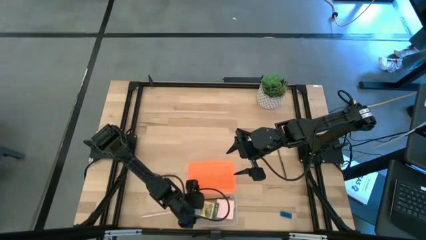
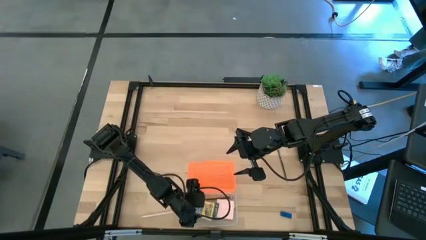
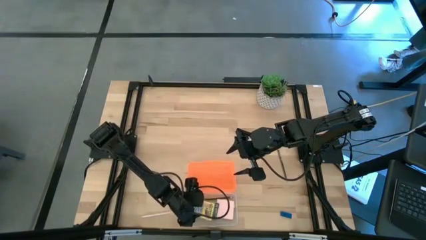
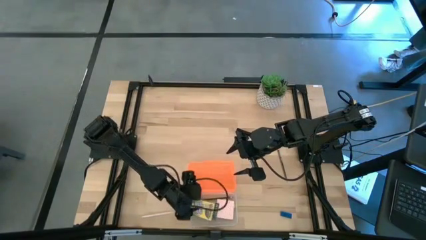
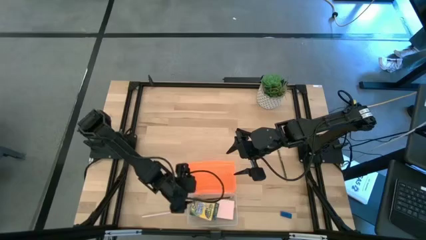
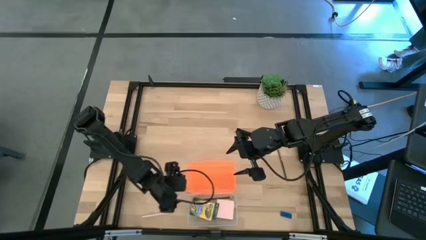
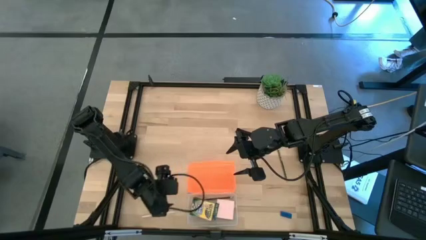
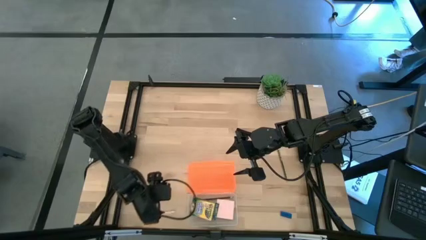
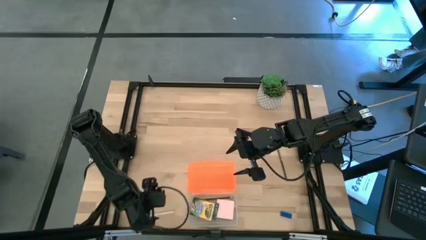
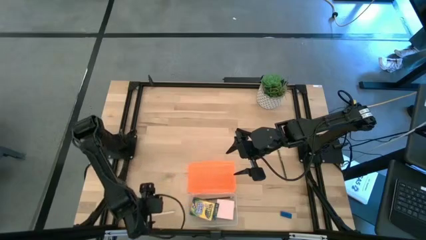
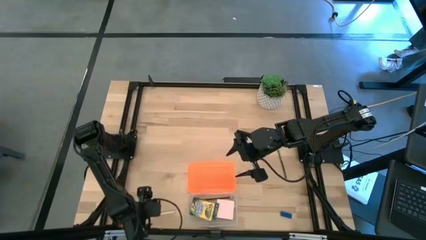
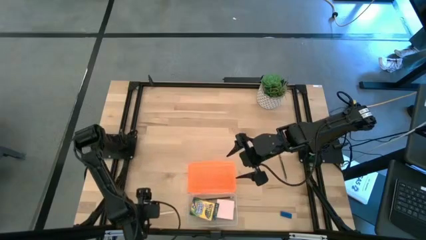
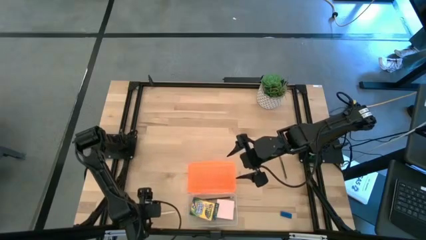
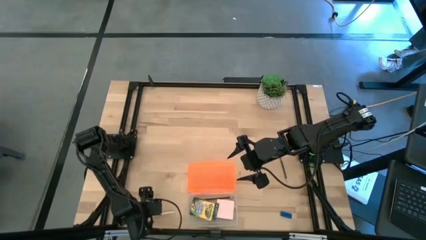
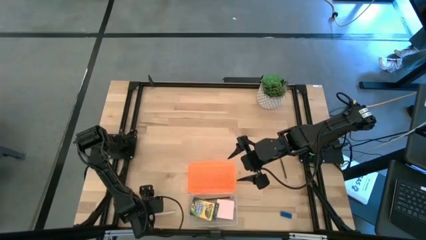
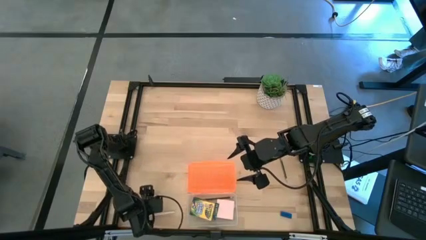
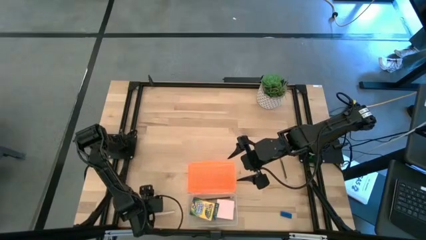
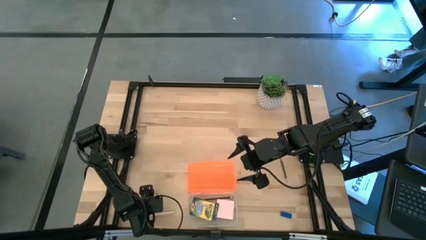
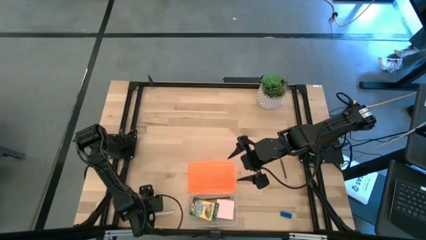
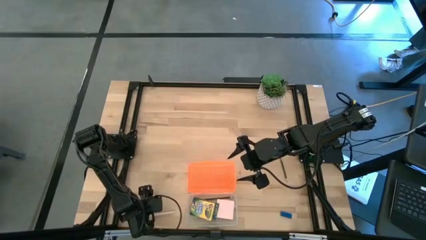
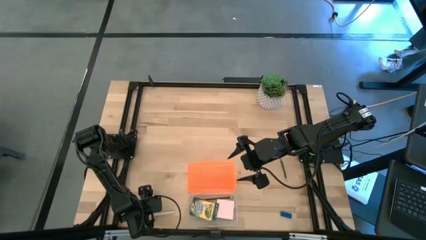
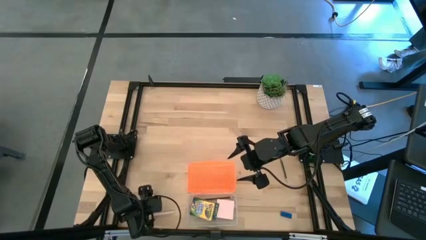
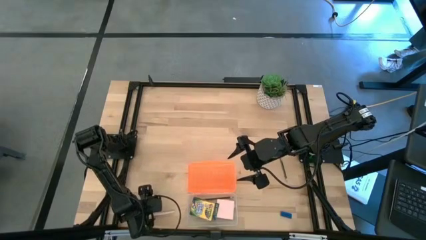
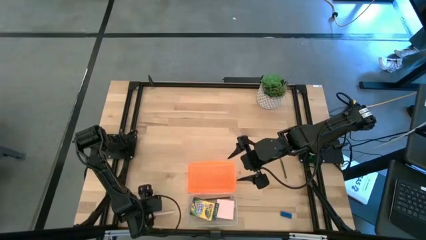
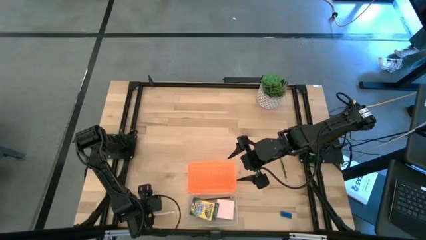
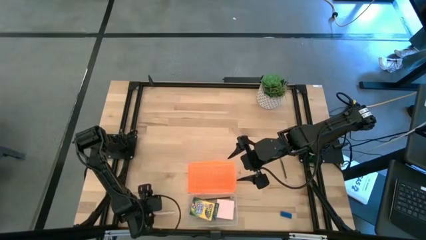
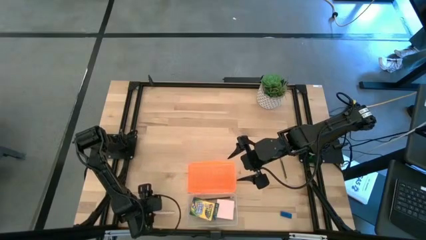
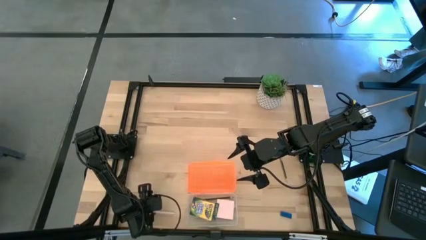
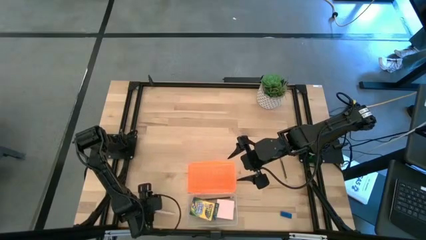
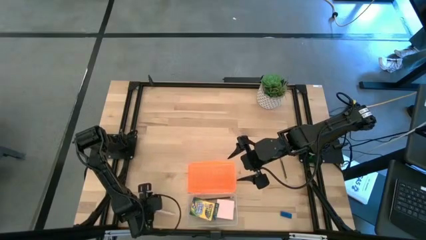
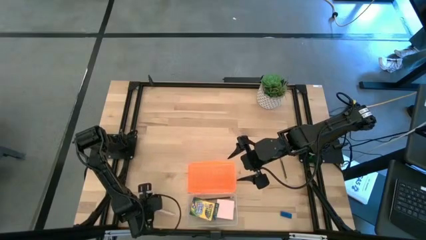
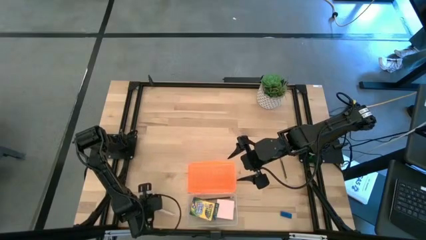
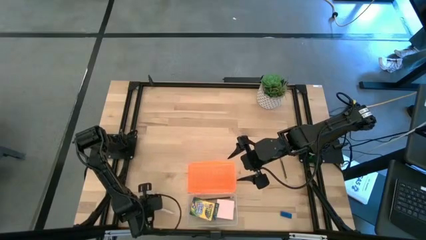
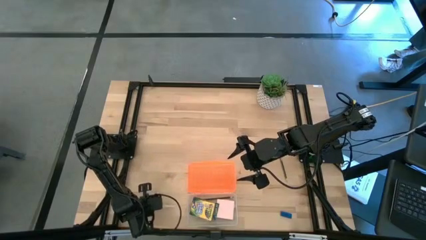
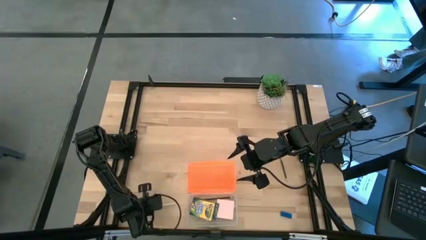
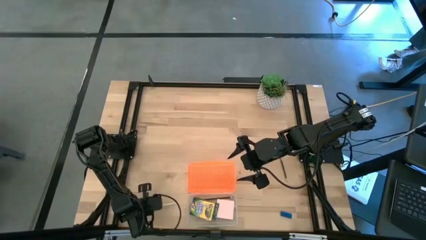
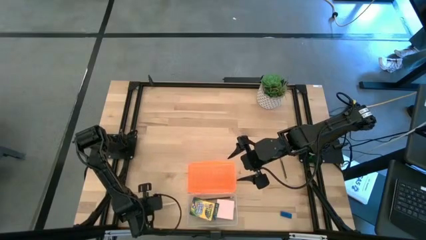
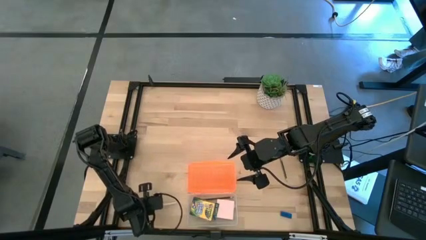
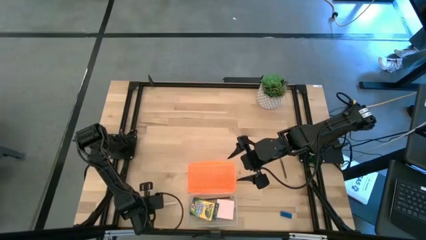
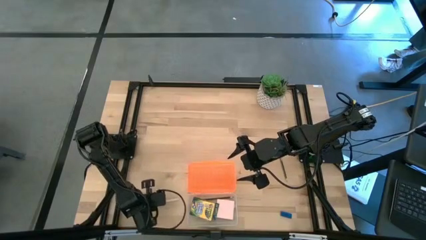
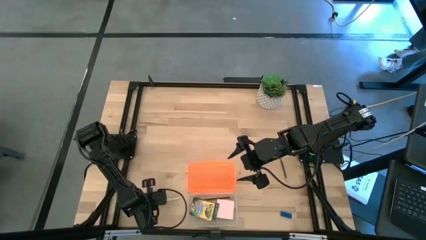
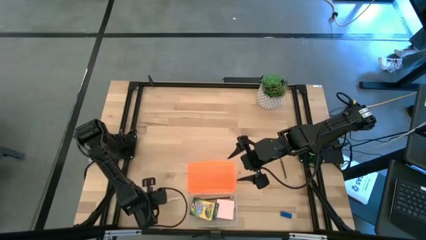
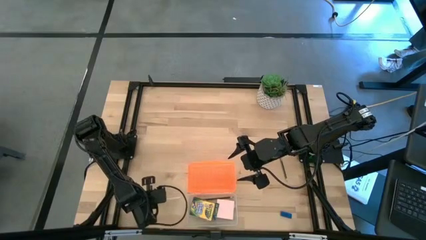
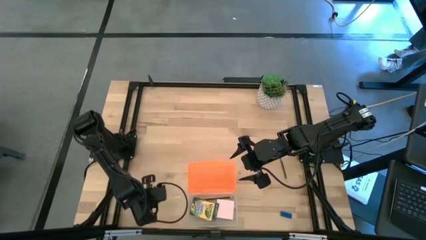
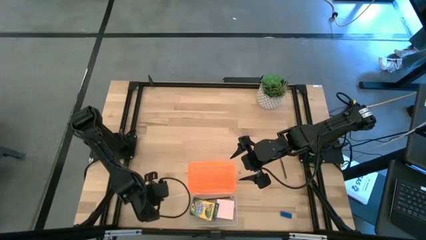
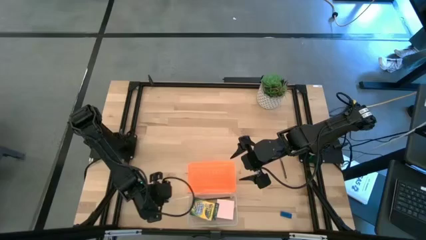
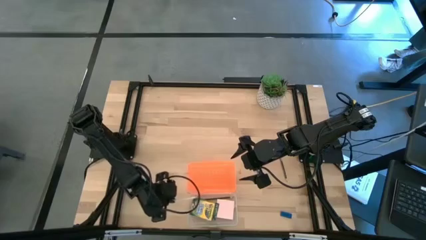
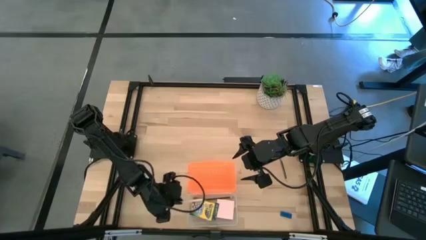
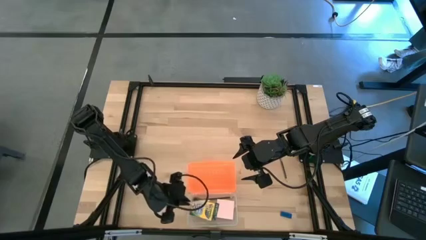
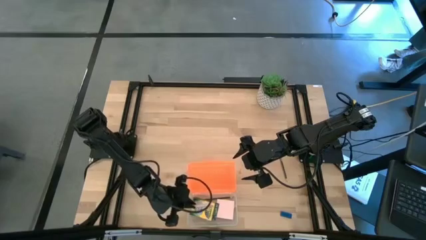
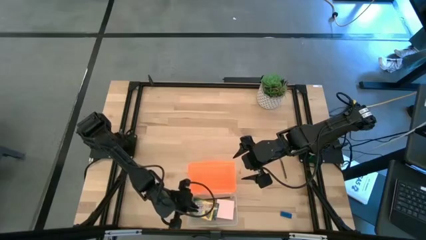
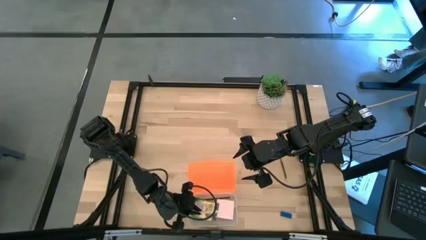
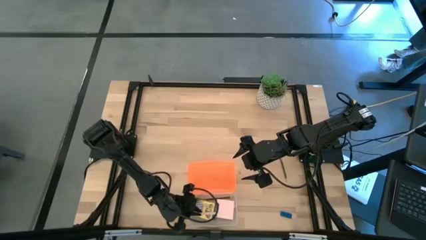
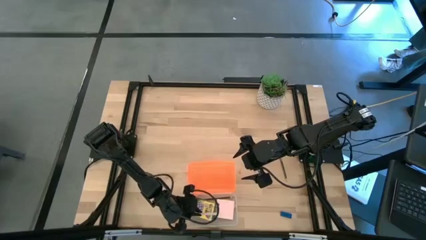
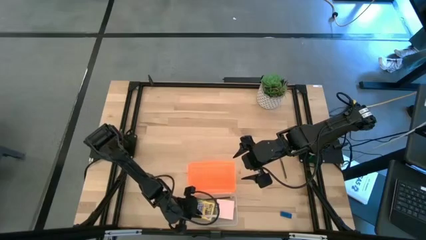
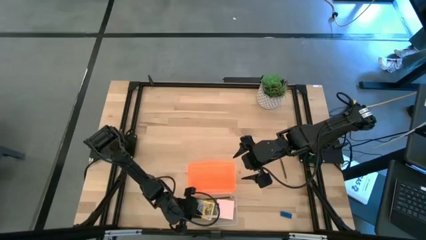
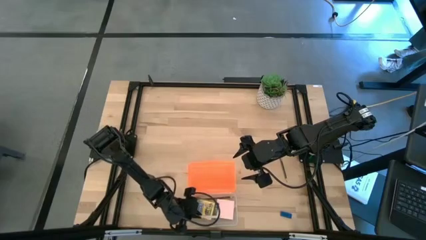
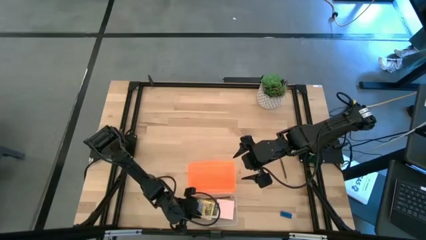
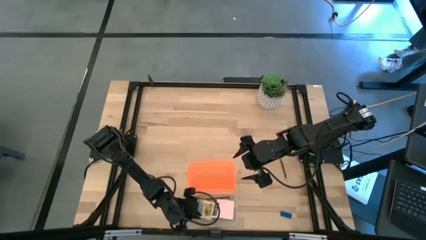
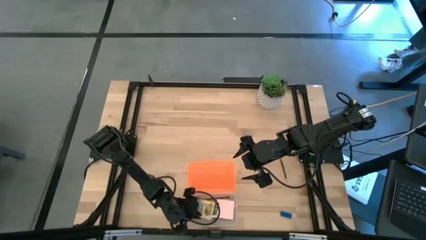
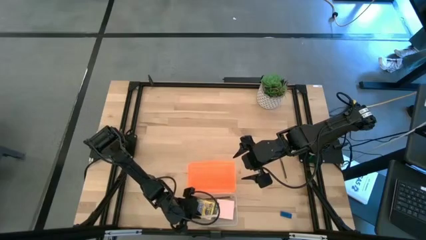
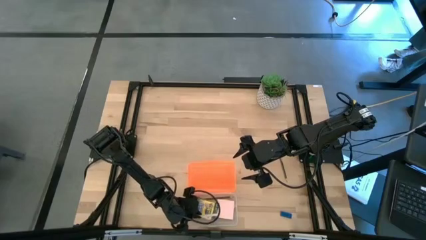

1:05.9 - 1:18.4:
Task: Pack school essentials
Put the white pen into the supply box

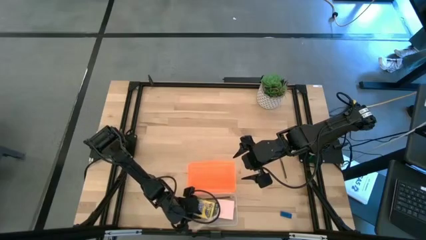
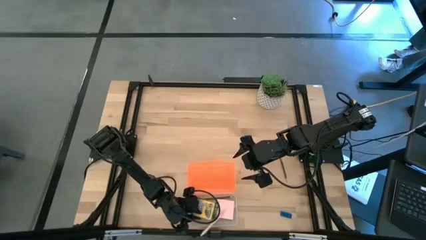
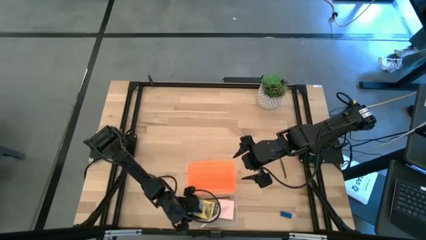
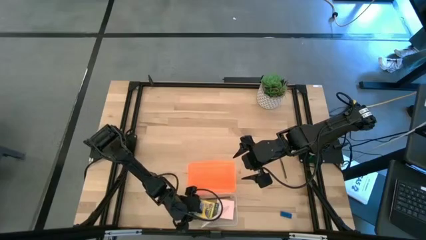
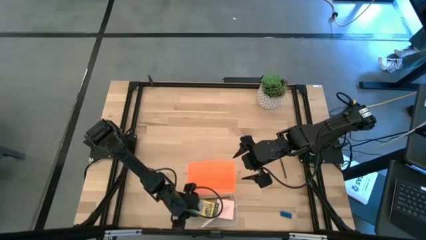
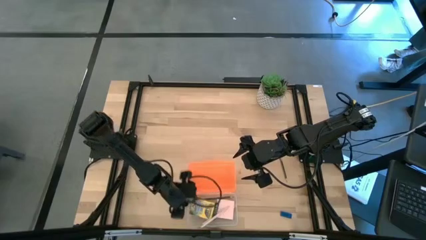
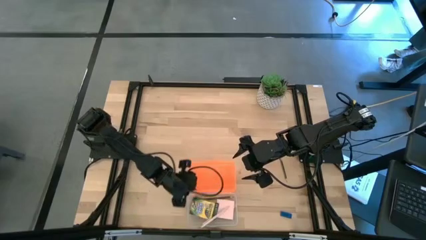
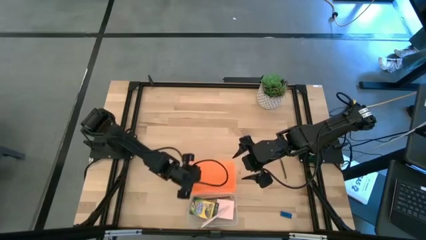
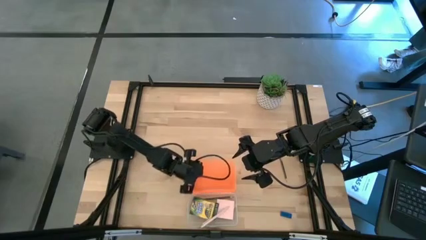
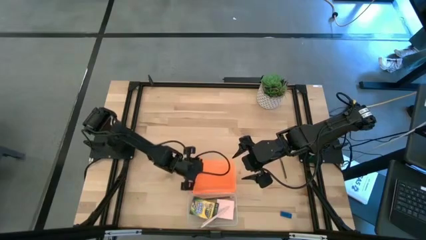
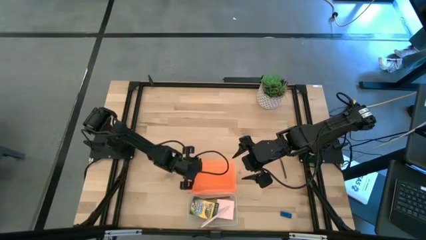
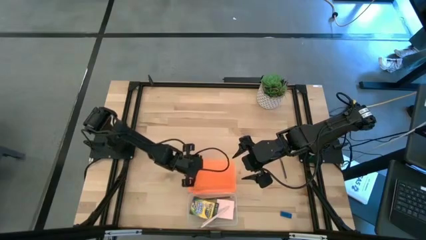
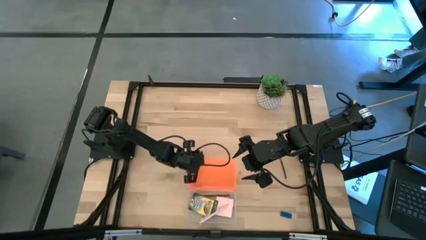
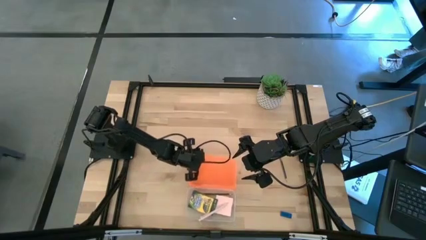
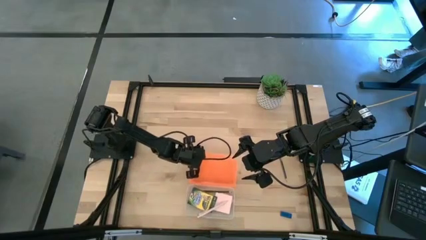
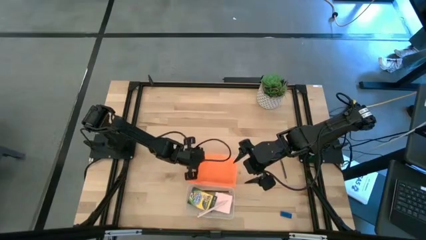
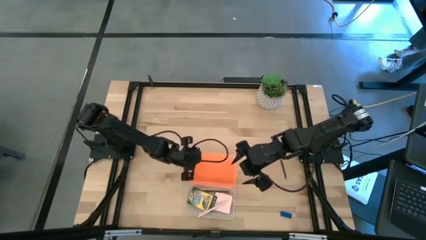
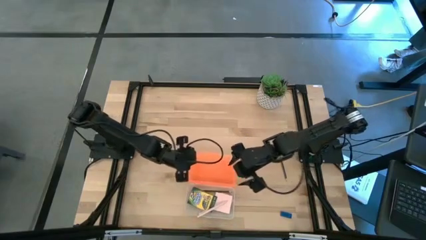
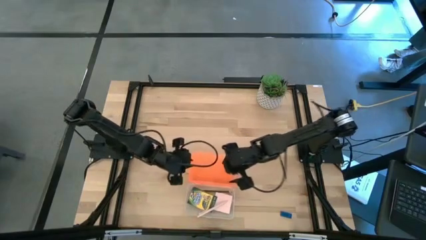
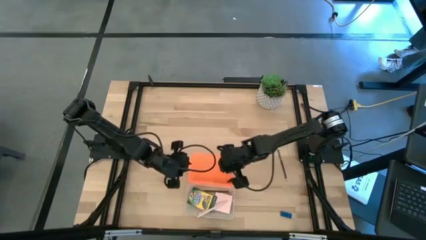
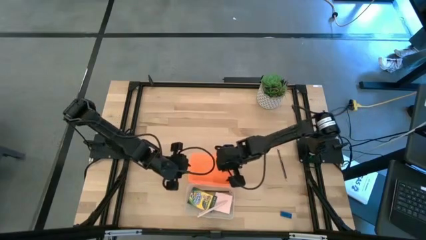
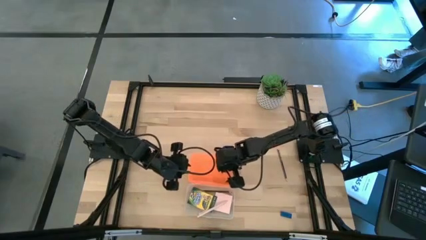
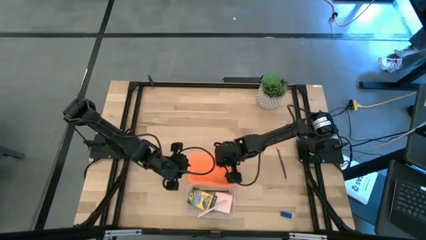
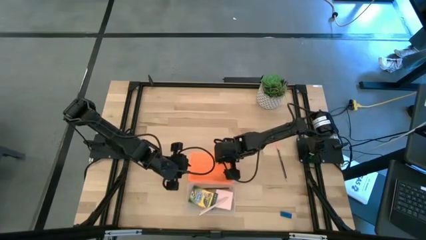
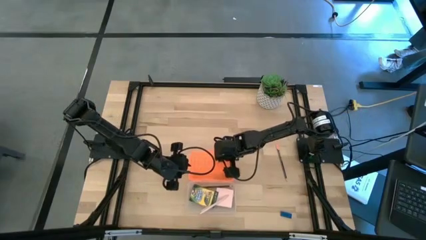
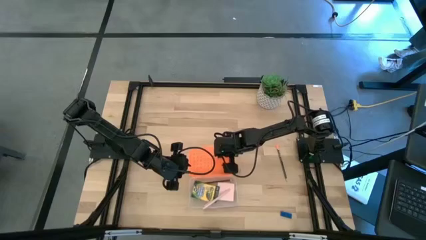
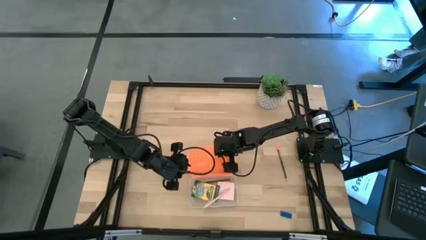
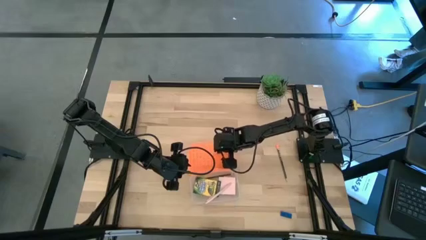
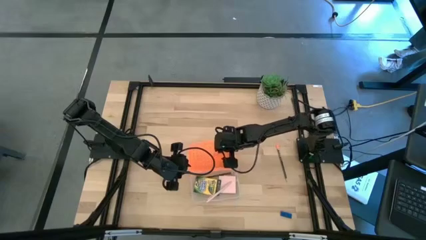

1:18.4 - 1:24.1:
Adjust the supply box
